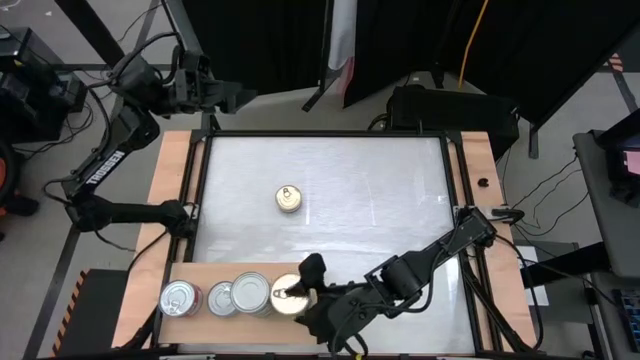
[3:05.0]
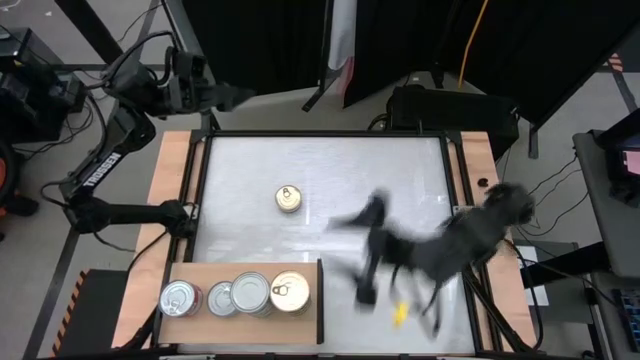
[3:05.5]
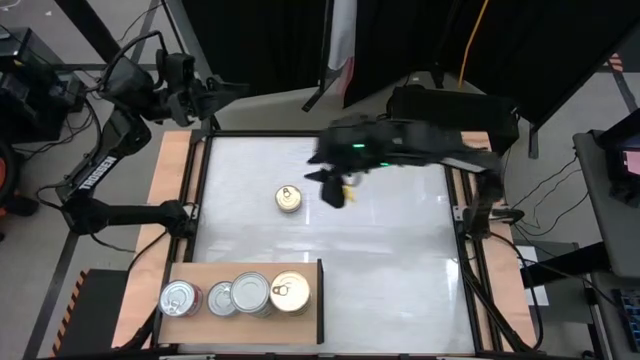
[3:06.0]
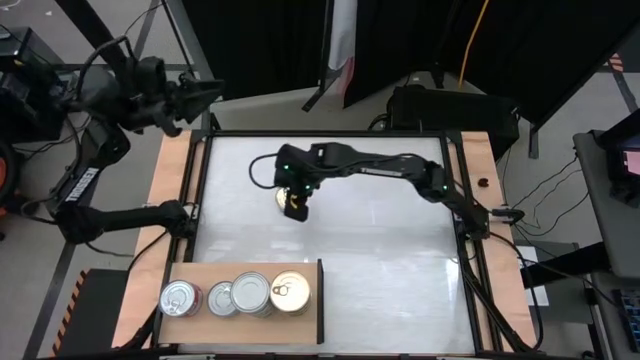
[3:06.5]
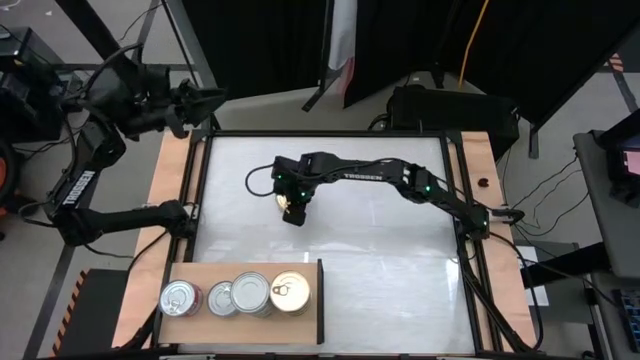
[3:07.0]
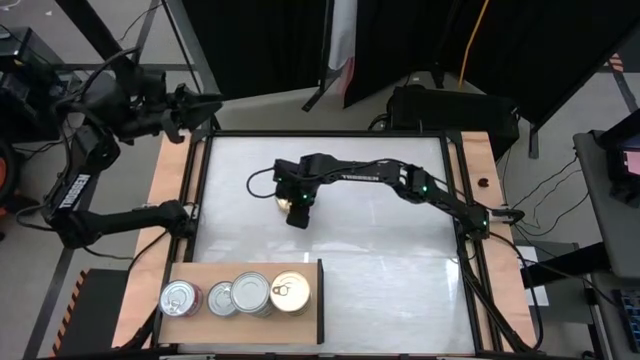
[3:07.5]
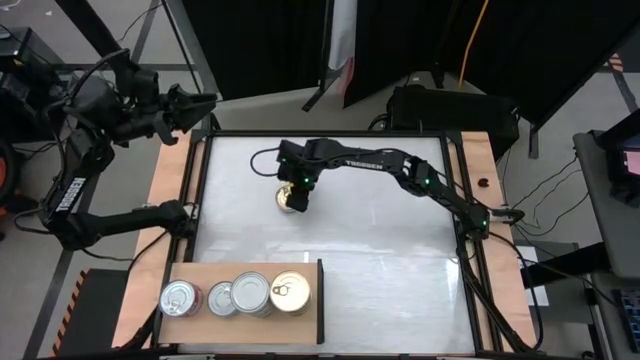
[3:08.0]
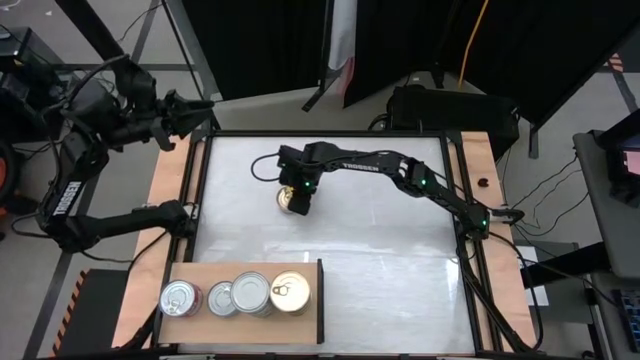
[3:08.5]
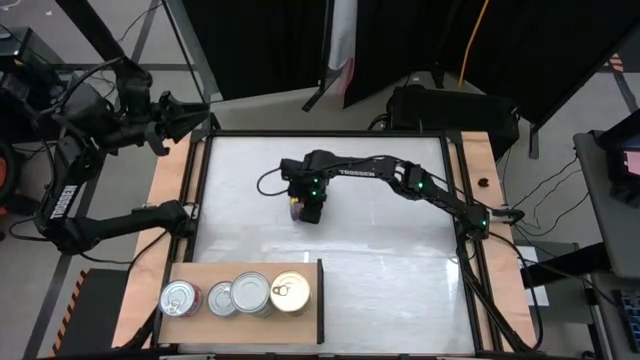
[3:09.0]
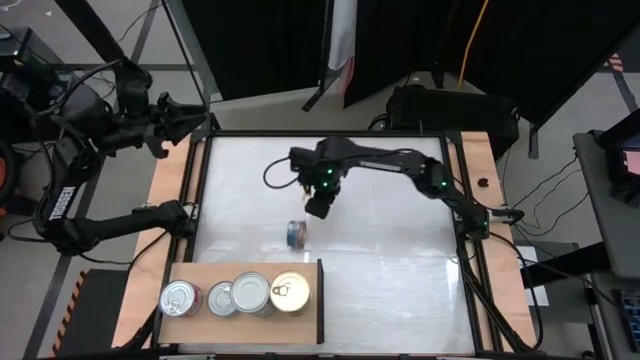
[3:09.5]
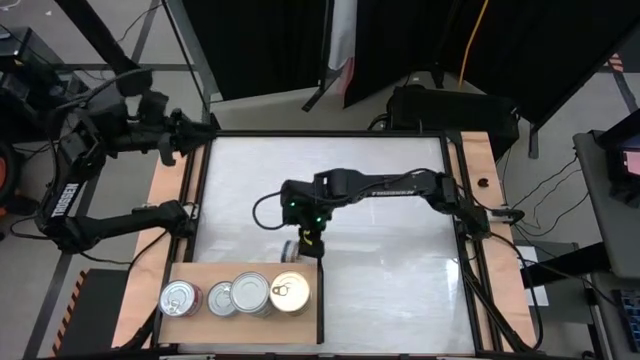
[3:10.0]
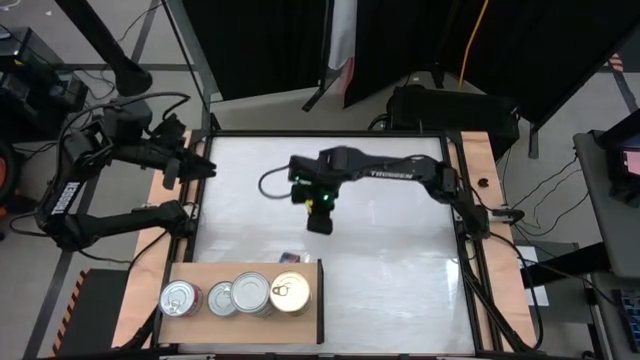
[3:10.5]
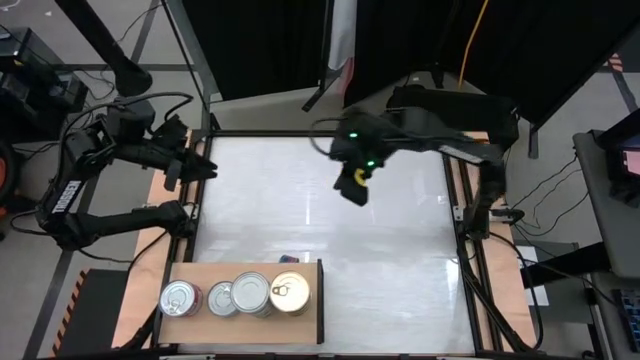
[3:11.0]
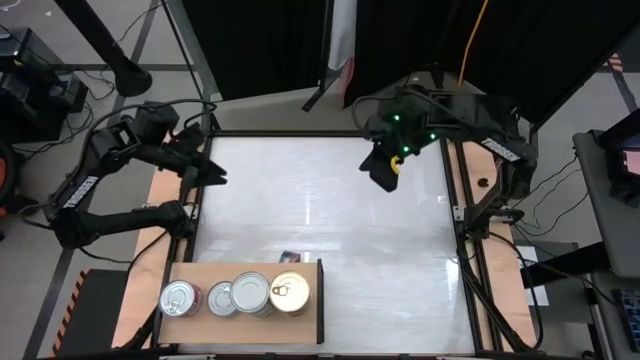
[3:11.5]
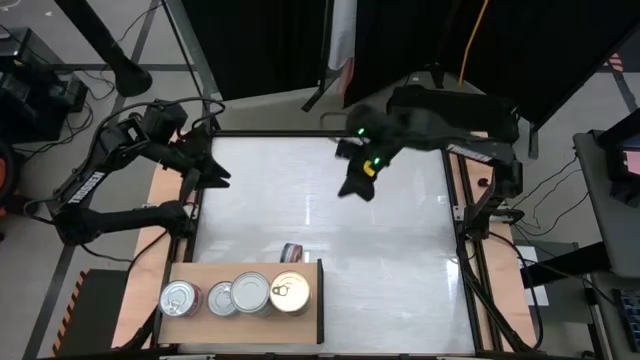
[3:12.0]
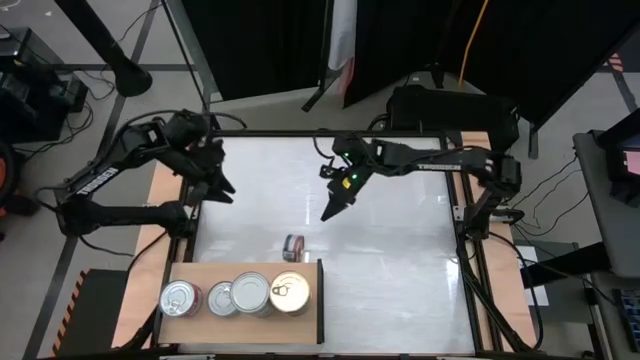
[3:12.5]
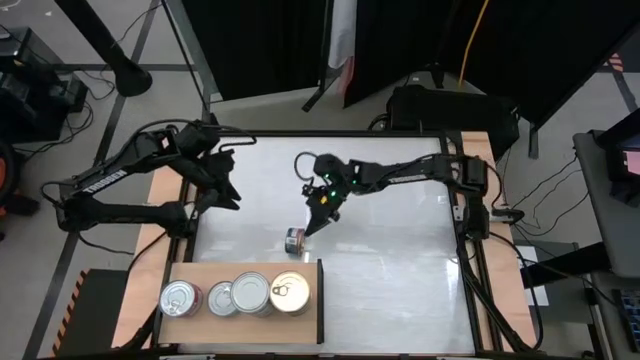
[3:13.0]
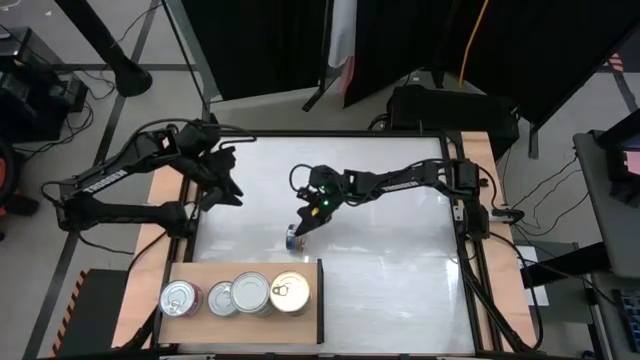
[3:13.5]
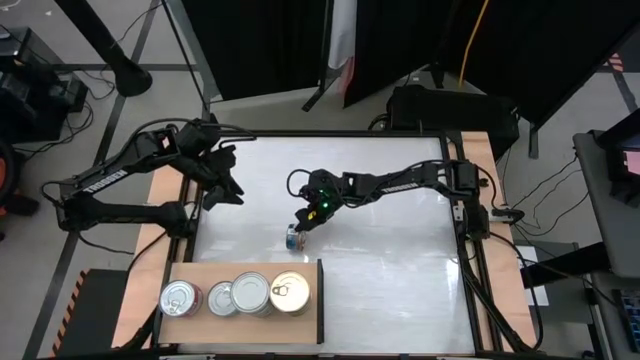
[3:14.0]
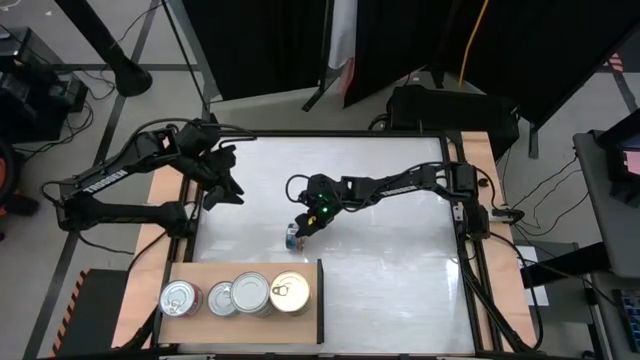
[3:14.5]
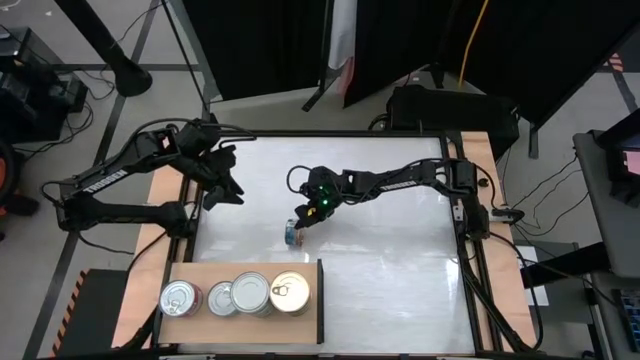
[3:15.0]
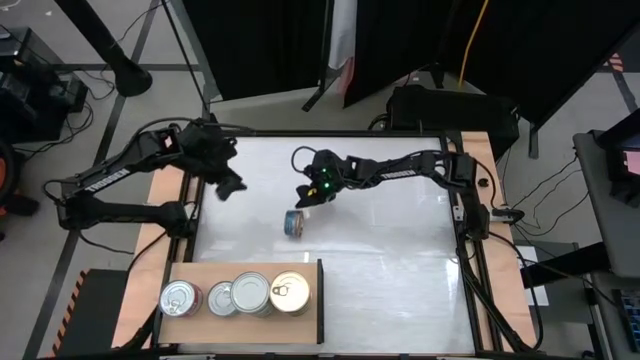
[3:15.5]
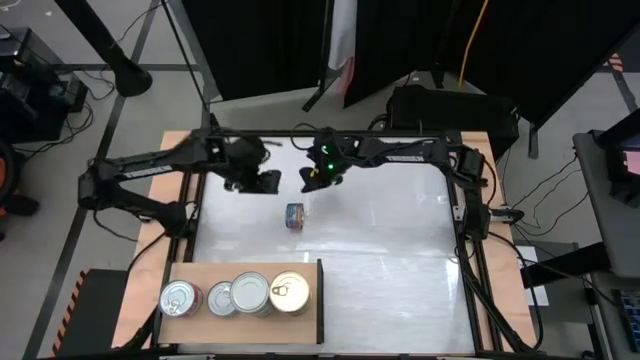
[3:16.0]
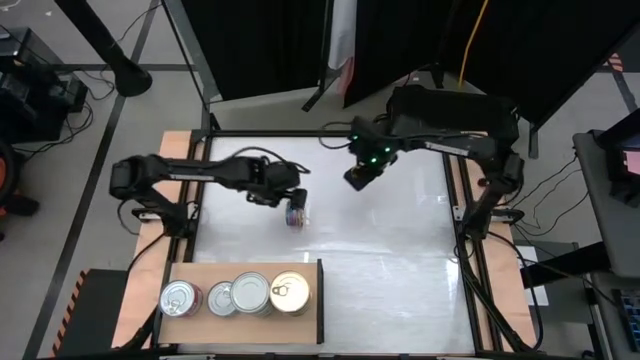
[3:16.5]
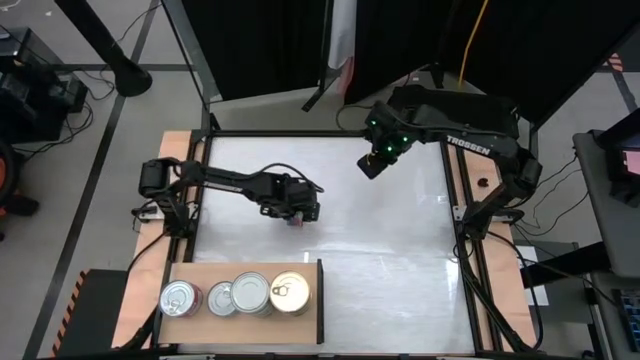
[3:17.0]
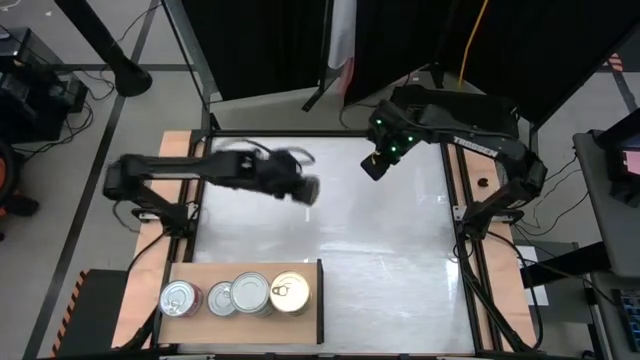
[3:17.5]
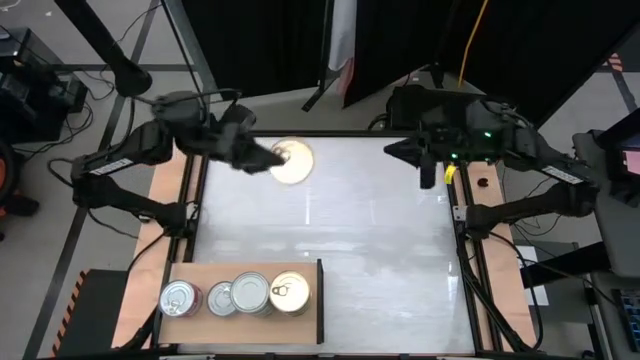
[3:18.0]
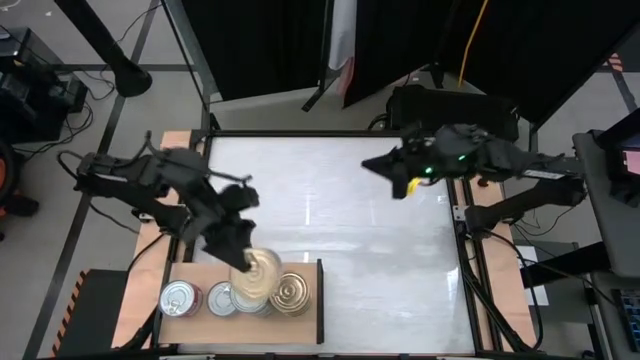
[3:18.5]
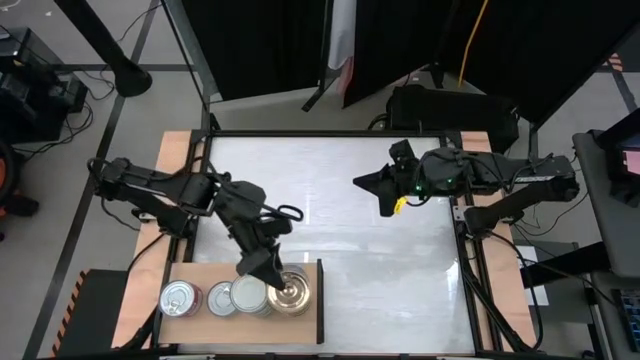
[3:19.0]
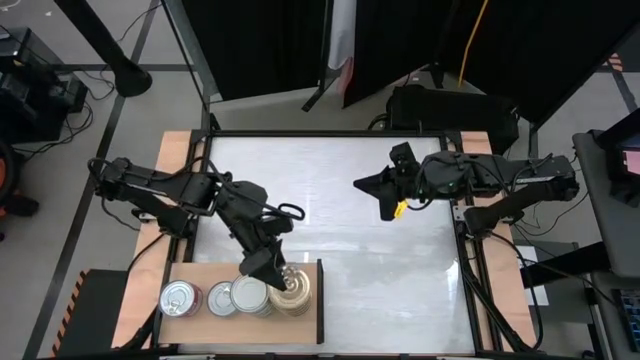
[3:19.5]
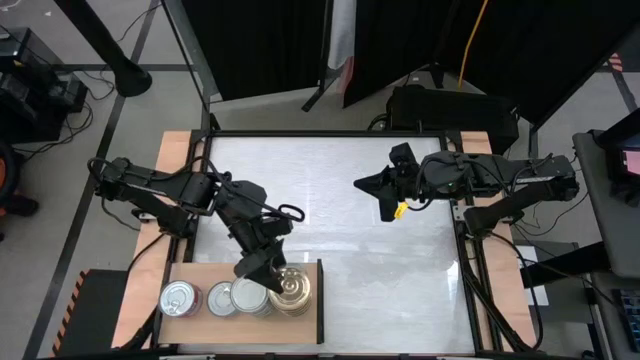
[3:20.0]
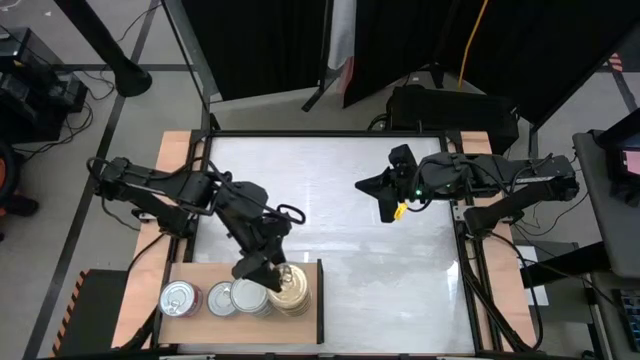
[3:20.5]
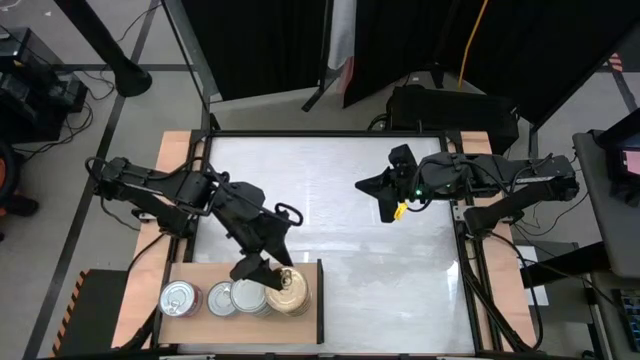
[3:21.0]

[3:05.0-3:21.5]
Task: Stack canned seafood by type on shelf
Stack the blue pink tuna can on top of the other blue pink tuna cans on the shelf

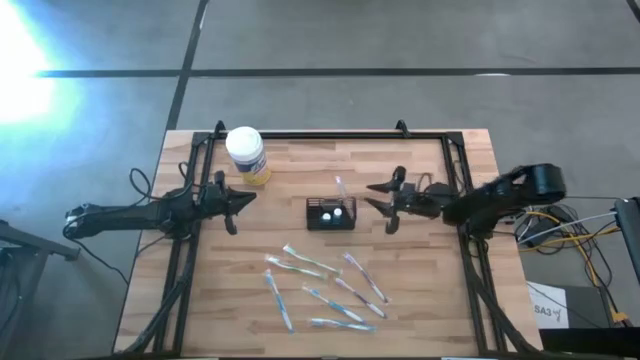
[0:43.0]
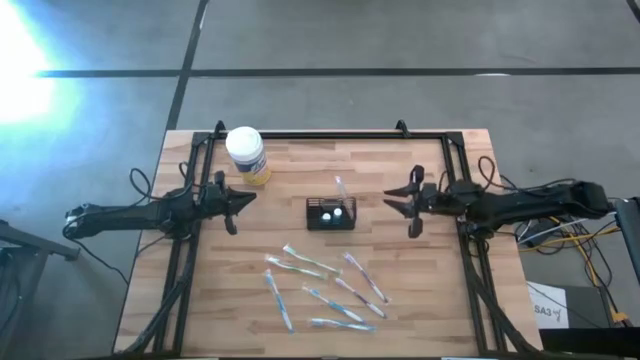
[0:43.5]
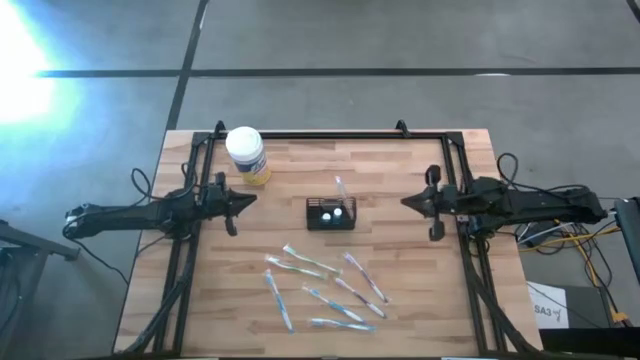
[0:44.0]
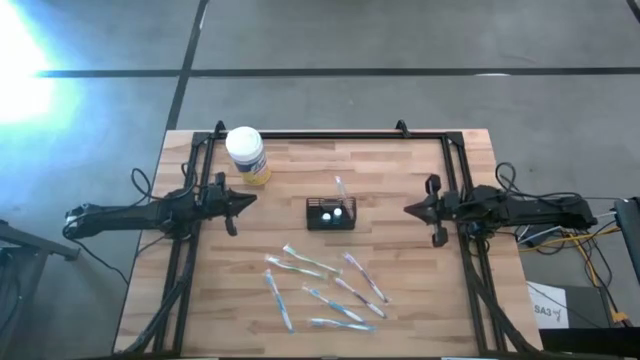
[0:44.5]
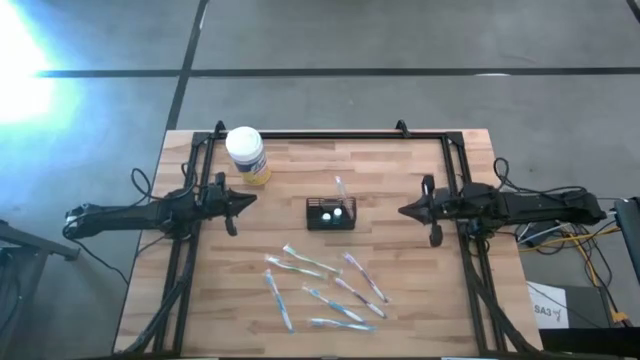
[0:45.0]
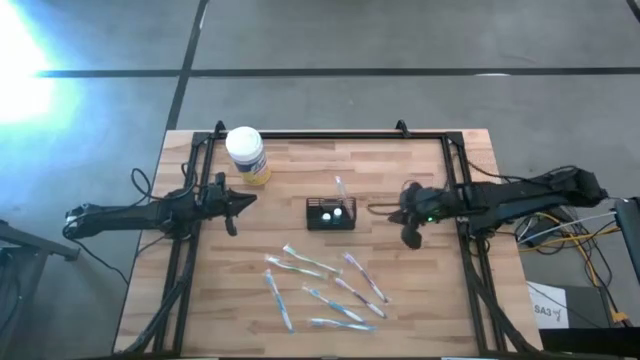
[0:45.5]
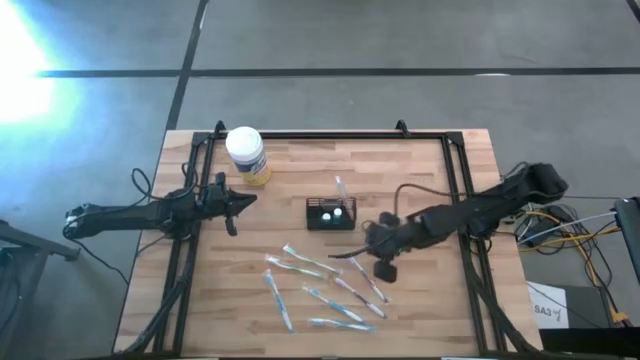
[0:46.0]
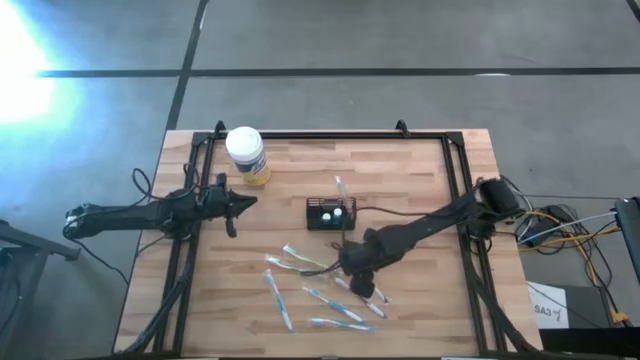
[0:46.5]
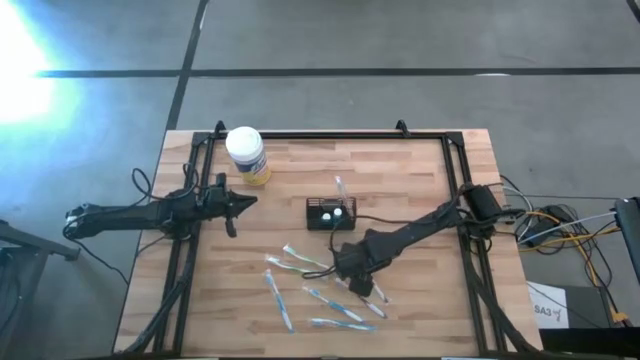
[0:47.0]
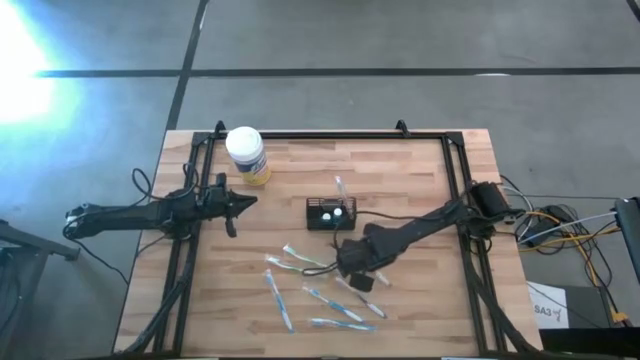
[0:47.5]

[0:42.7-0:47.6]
Task: Pick & Place toothbrushing station
Put the top purple toothbrush into the wire organizer
